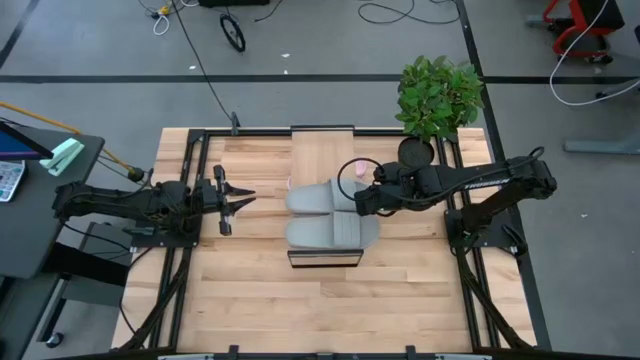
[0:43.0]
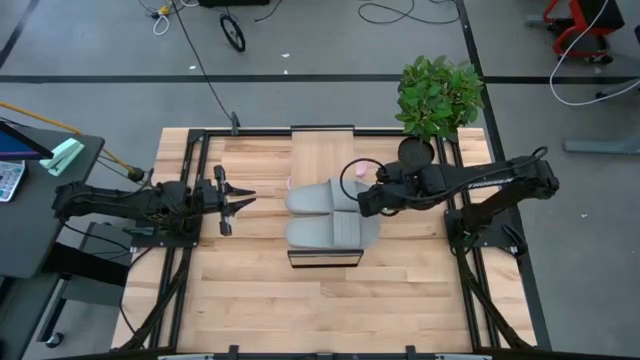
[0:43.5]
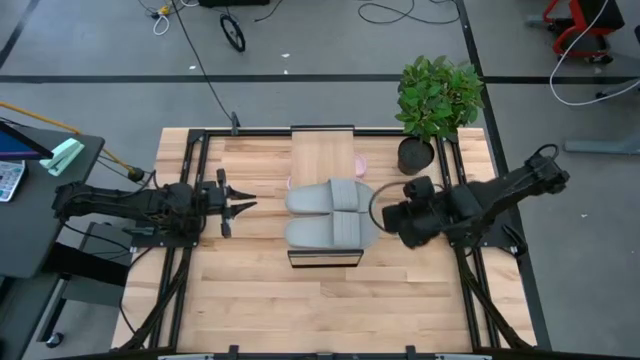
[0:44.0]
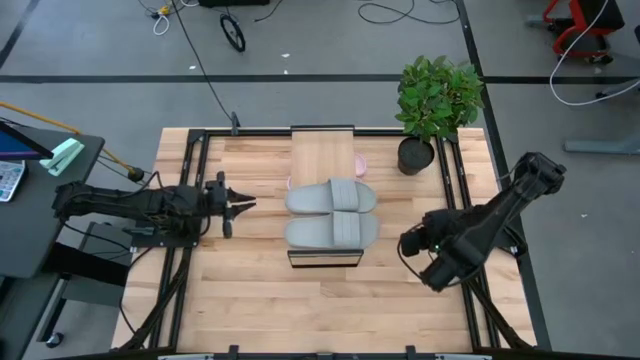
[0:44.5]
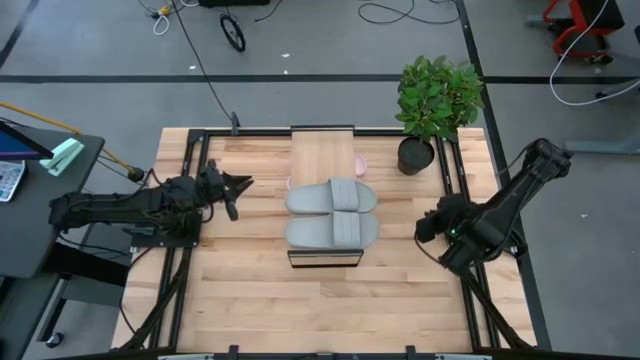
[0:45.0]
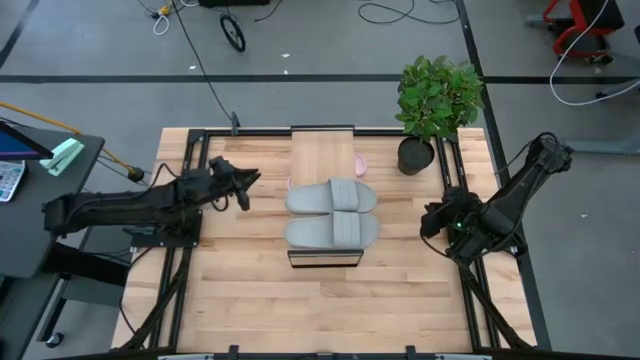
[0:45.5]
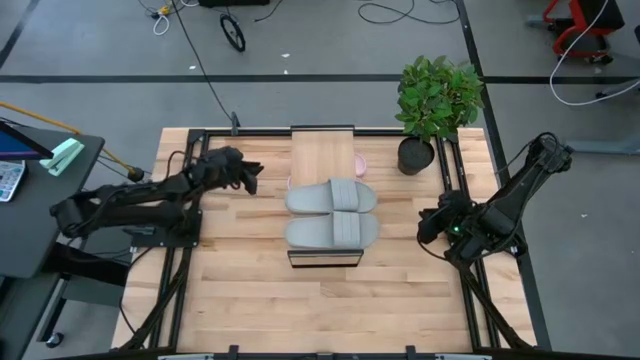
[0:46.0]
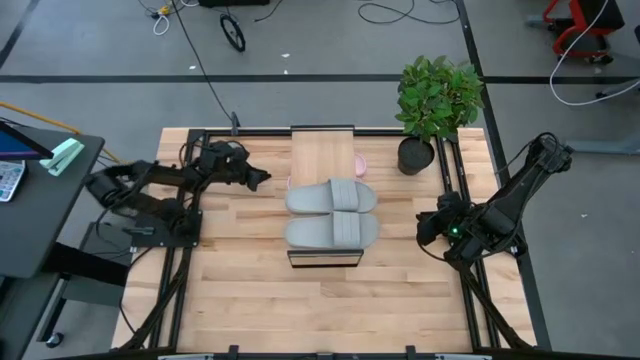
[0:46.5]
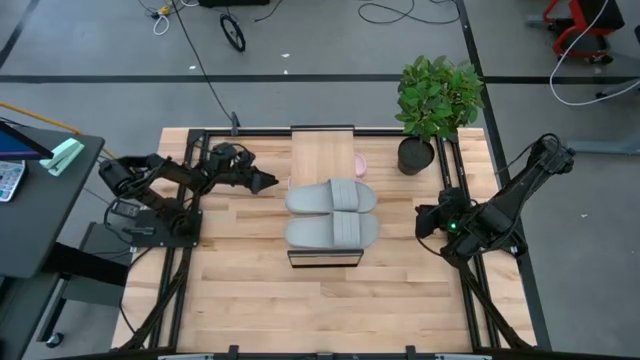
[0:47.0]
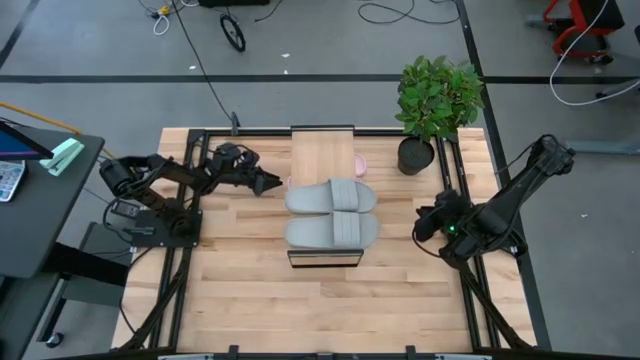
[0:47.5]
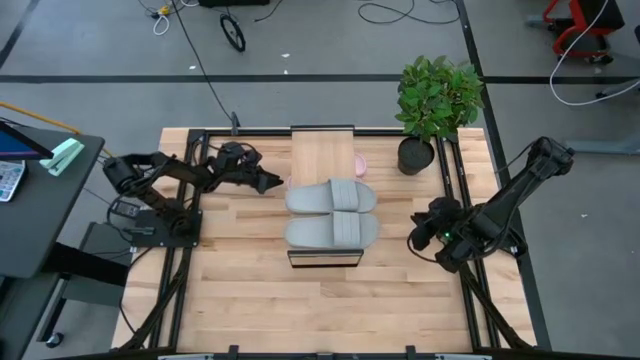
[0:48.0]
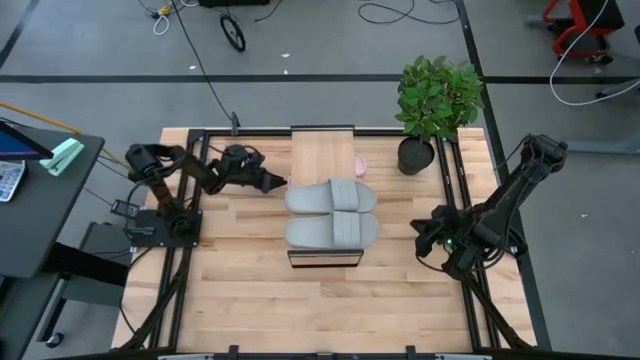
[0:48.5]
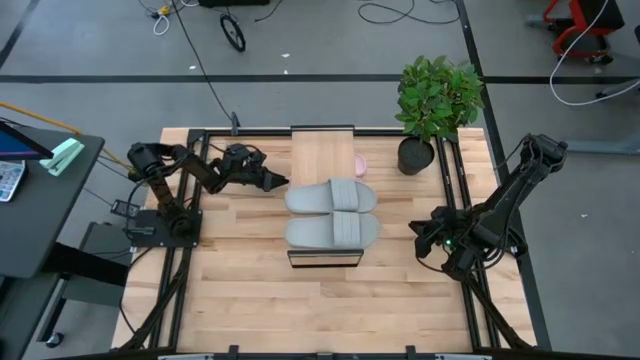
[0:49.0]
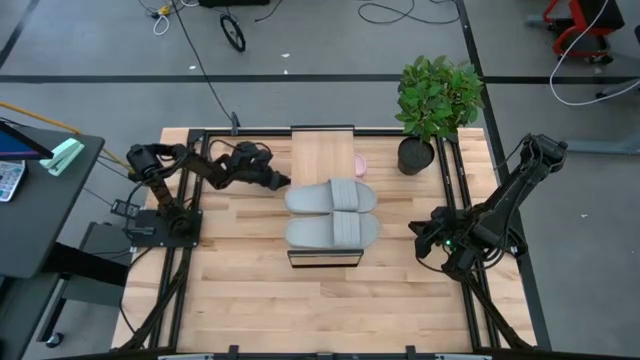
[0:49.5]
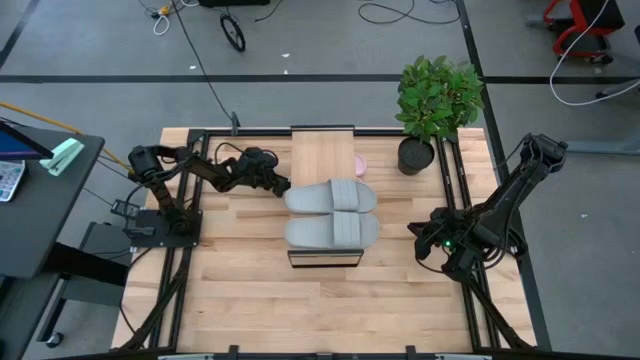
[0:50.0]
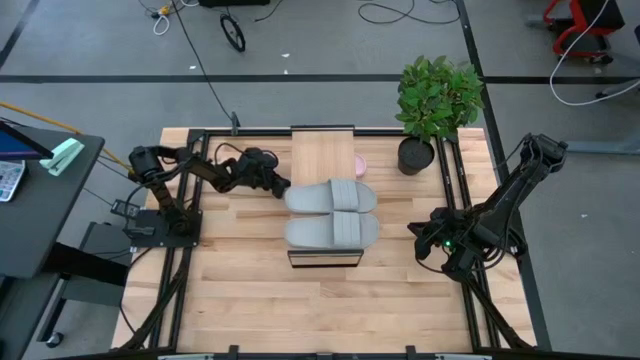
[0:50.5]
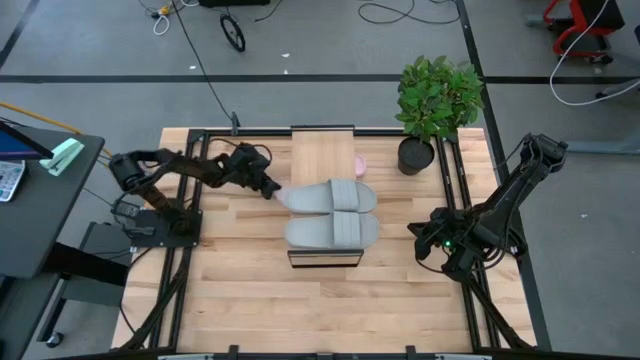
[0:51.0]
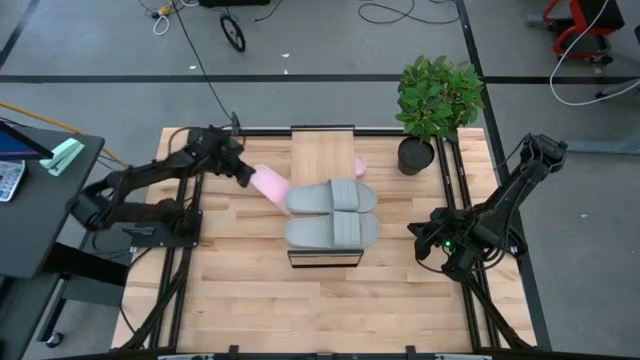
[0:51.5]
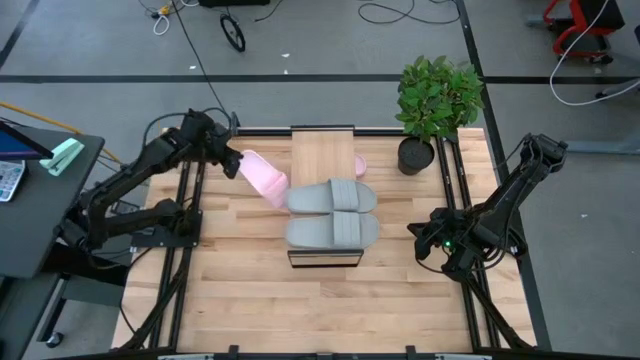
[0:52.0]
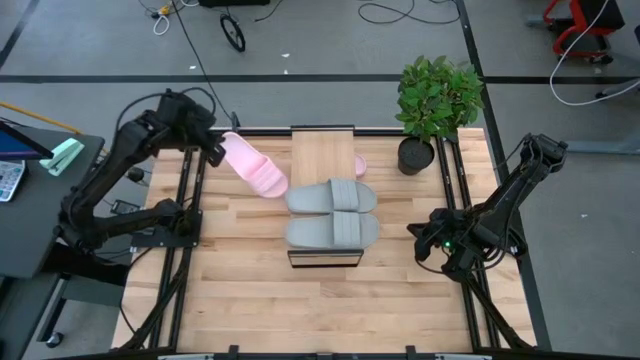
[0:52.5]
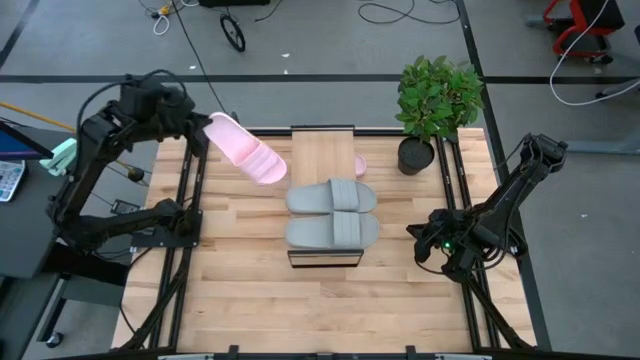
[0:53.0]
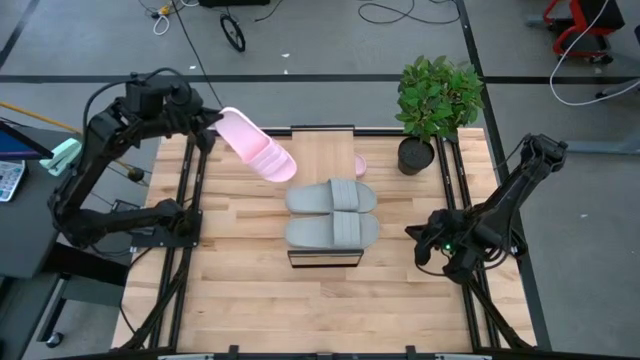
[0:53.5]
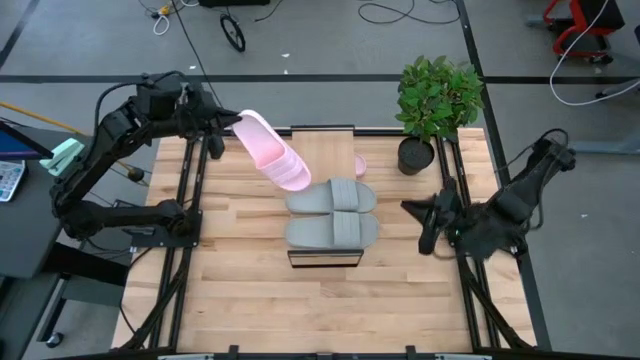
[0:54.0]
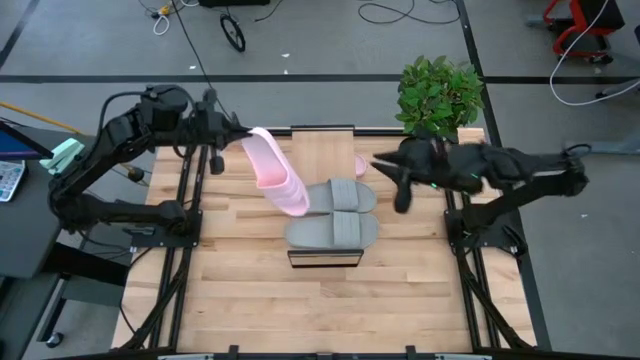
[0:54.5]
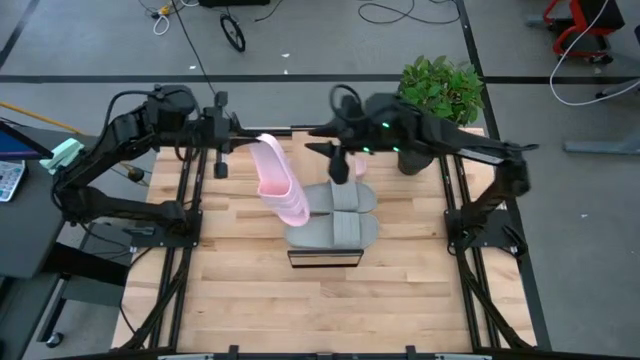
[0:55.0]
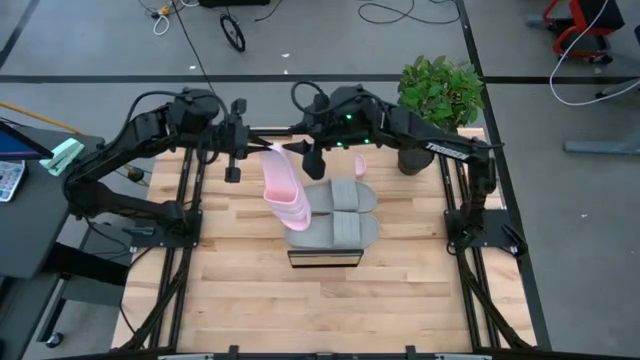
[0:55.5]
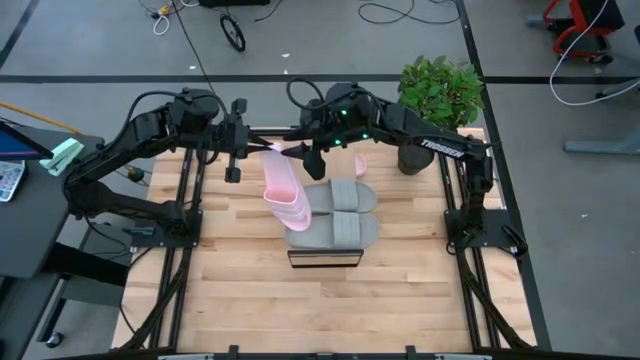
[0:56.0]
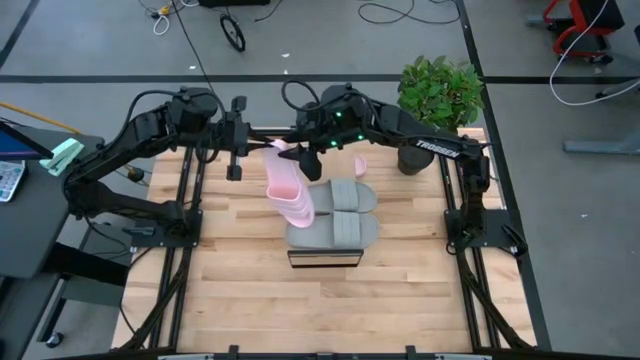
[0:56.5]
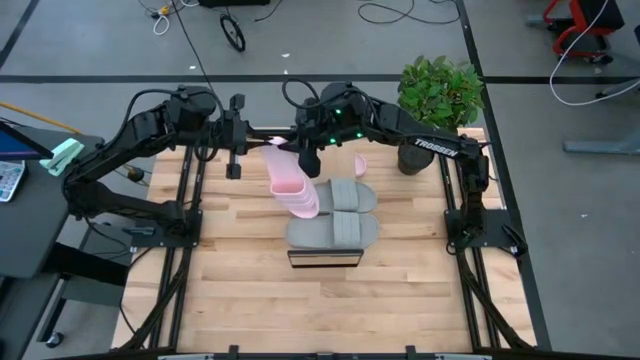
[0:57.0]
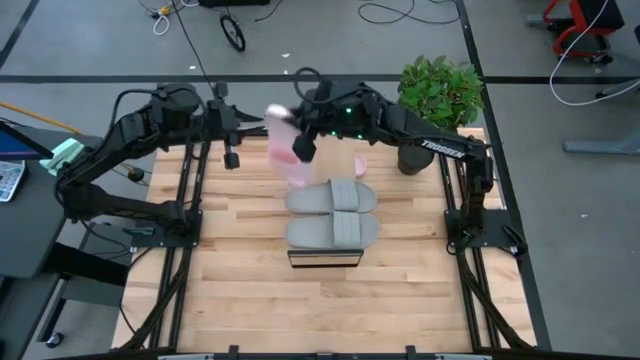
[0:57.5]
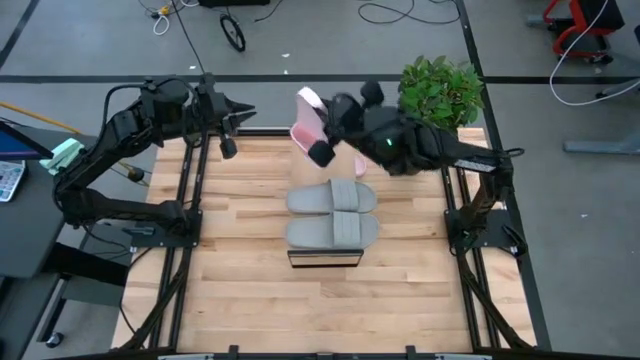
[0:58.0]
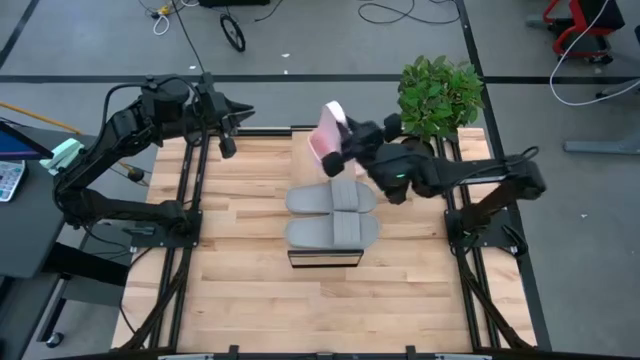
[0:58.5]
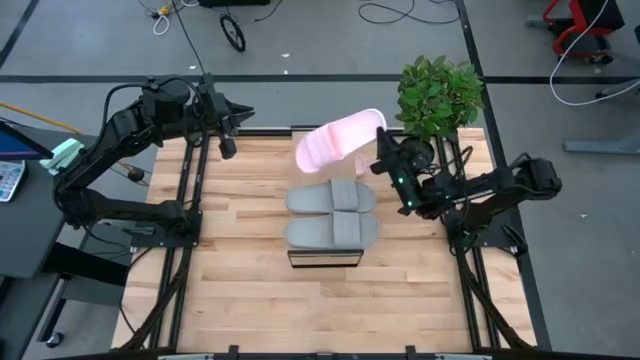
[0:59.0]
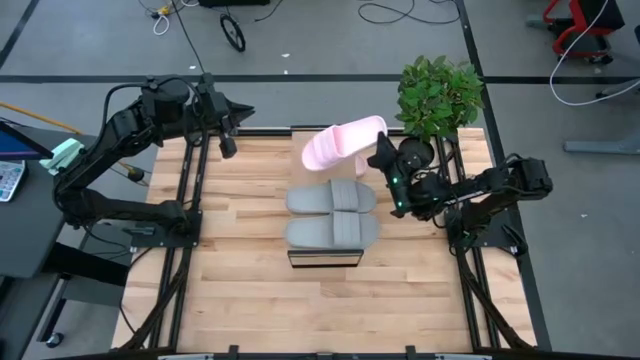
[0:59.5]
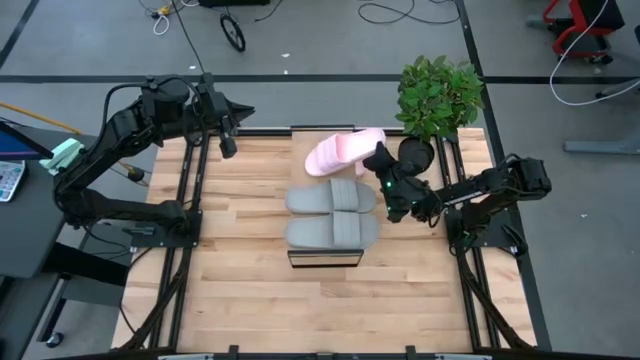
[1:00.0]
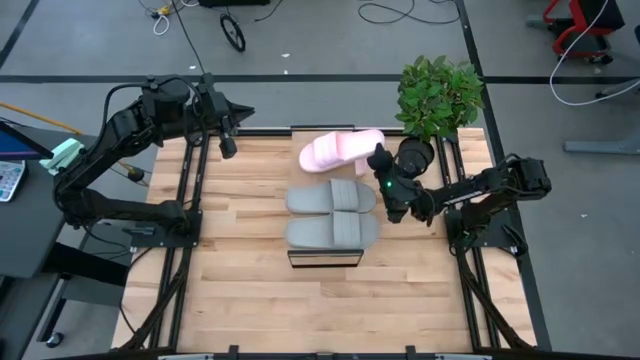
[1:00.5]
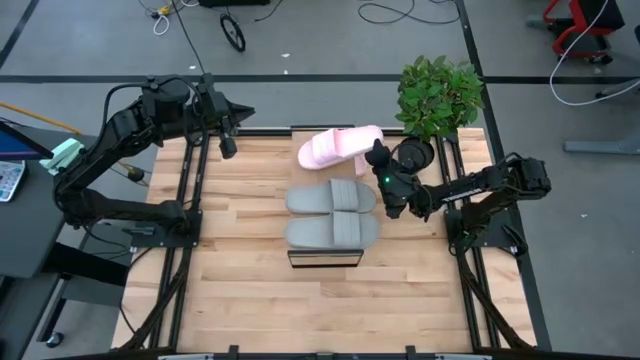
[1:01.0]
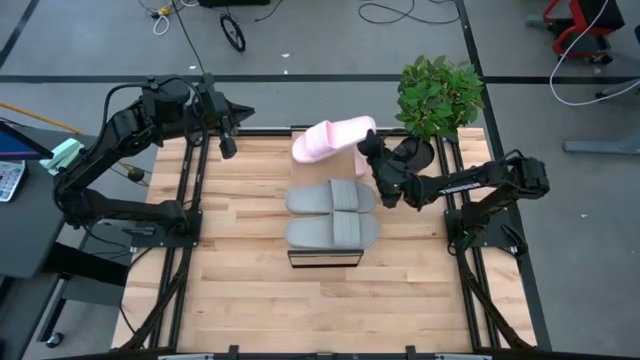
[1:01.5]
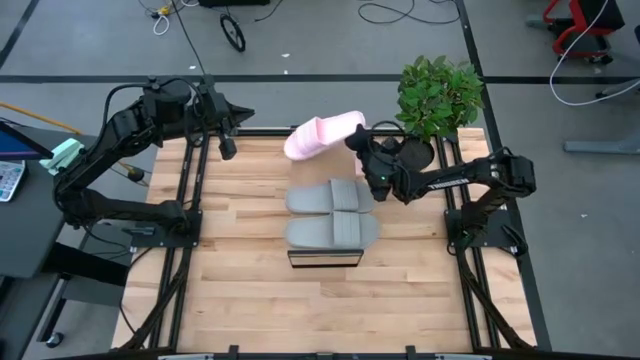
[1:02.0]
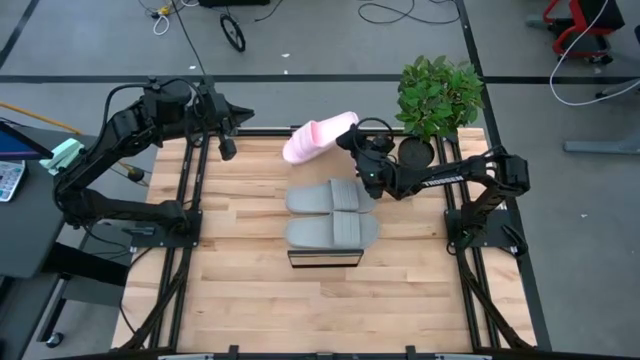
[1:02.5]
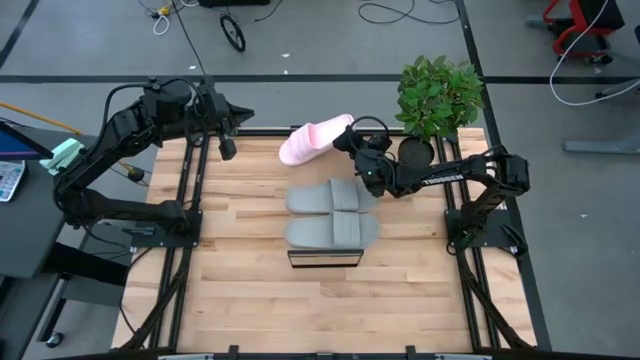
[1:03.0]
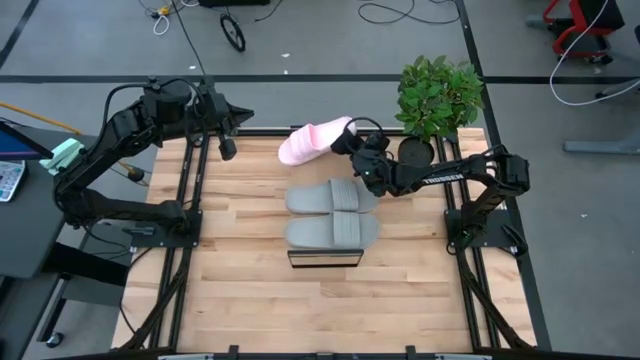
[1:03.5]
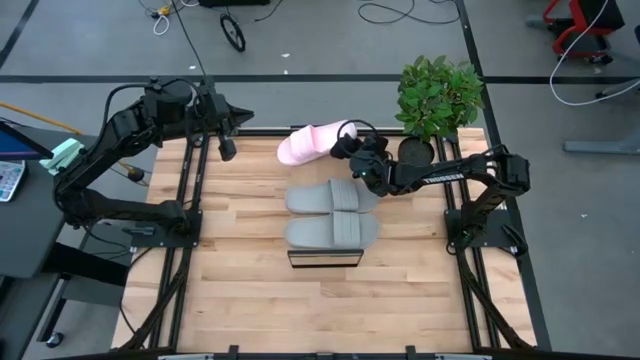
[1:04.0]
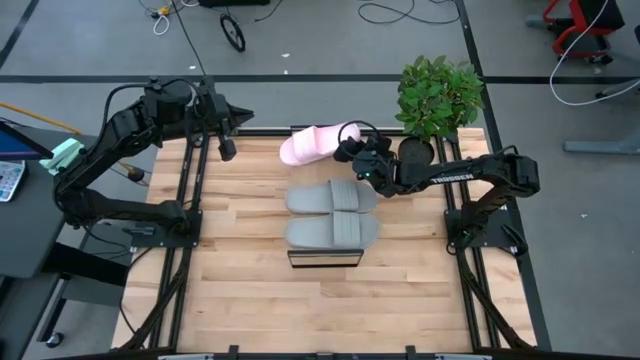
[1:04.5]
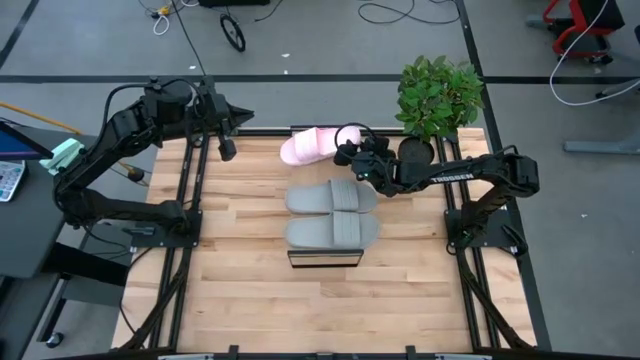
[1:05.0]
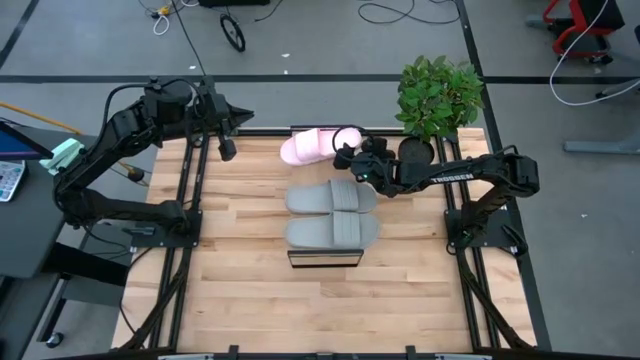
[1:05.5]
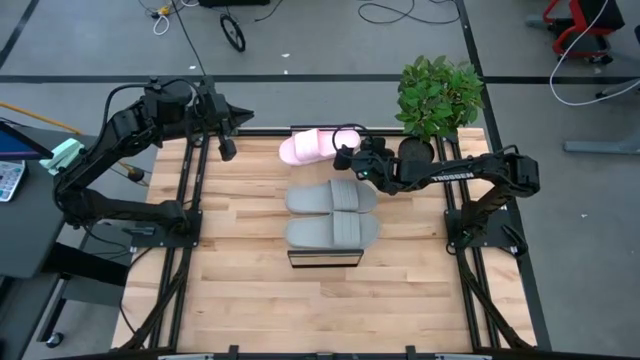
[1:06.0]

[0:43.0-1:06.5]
Task: Pick and place slides into the shelf
Put the bottom pink slipper on the shelf
